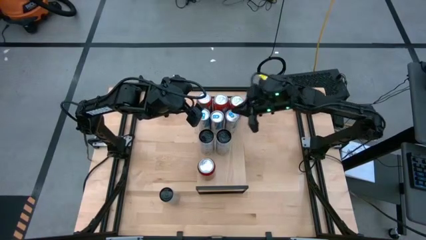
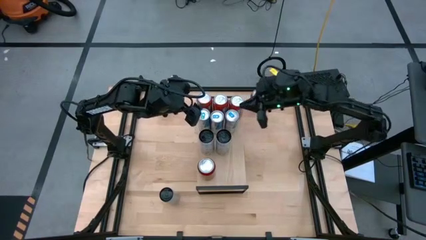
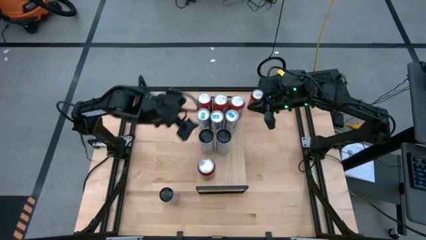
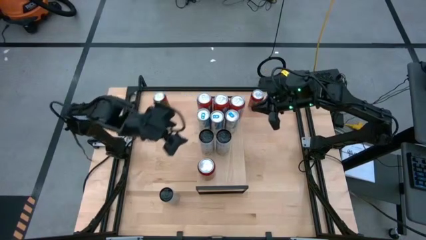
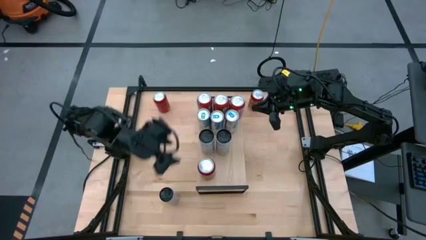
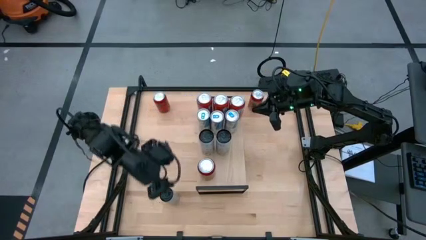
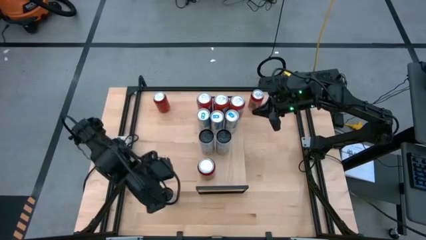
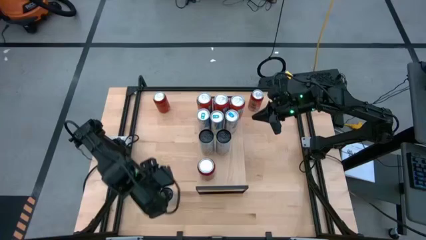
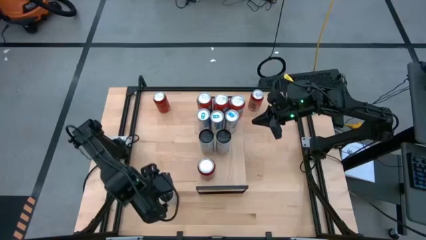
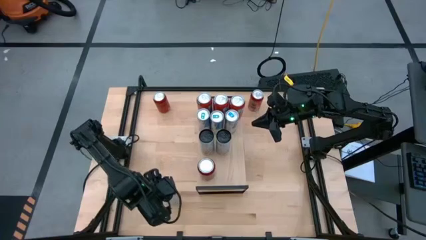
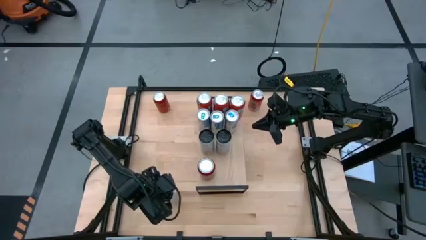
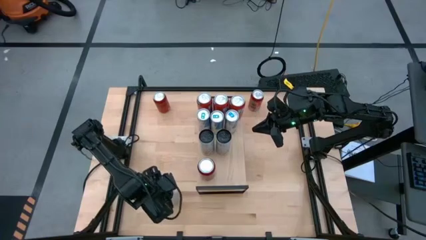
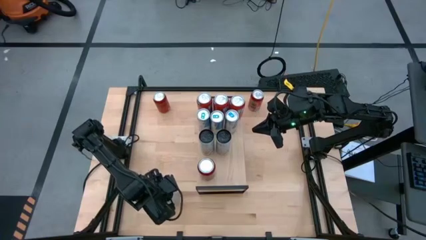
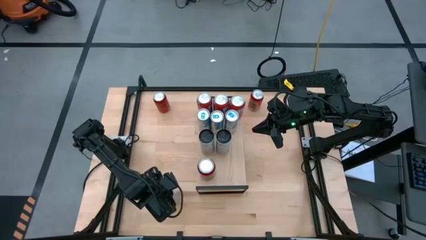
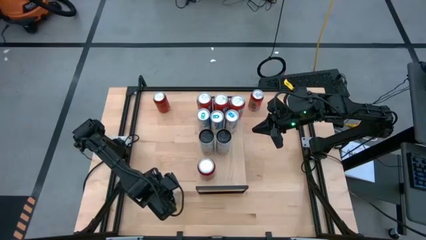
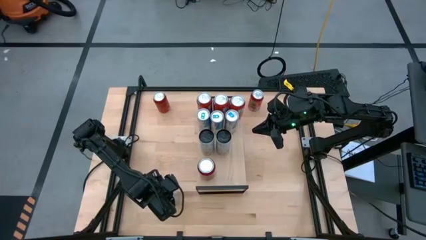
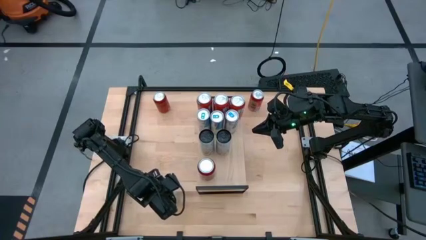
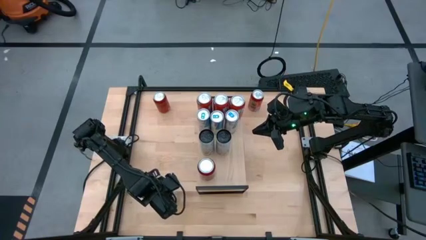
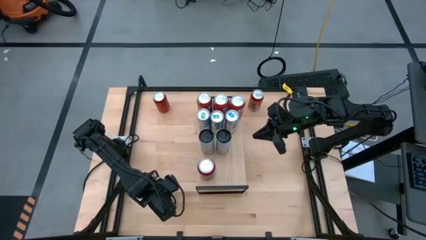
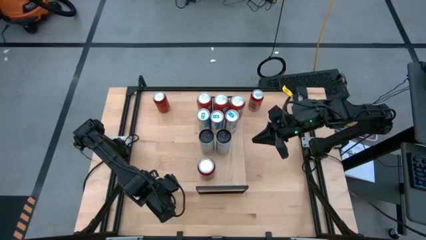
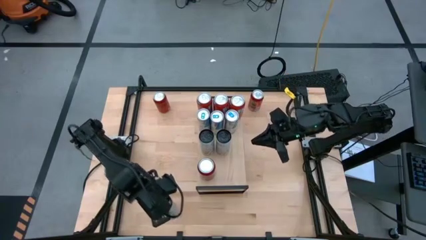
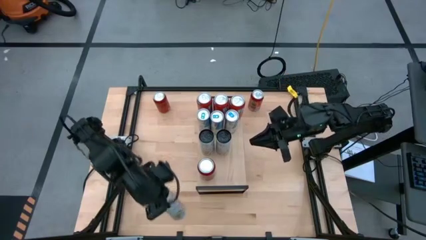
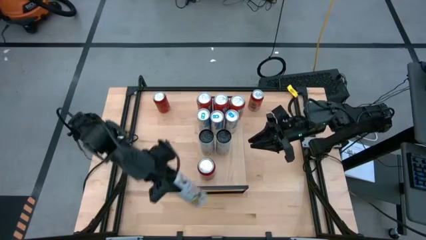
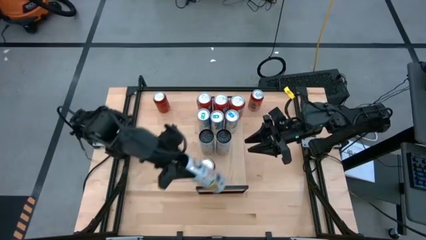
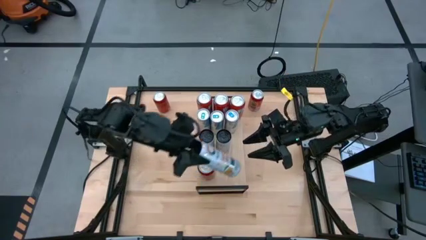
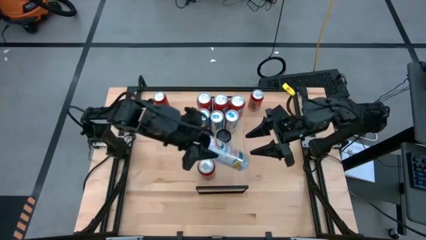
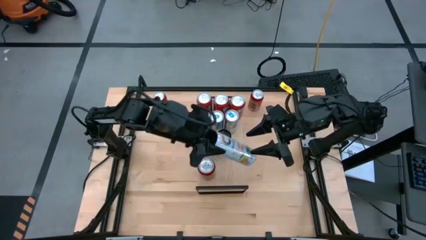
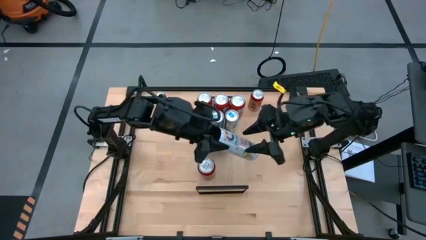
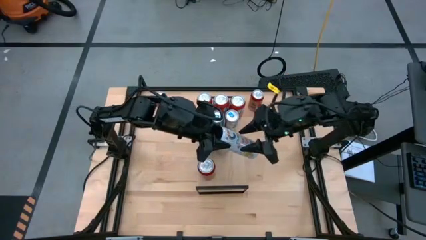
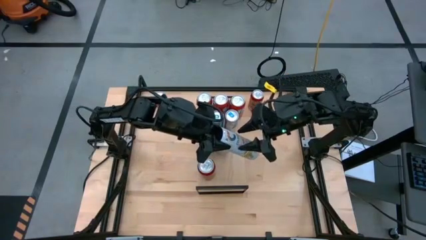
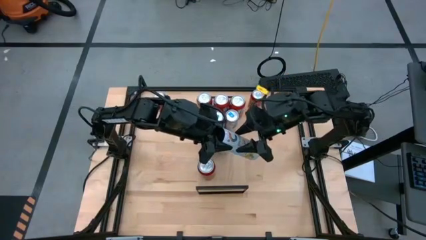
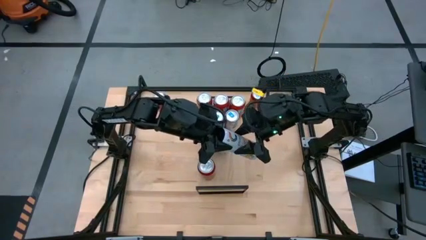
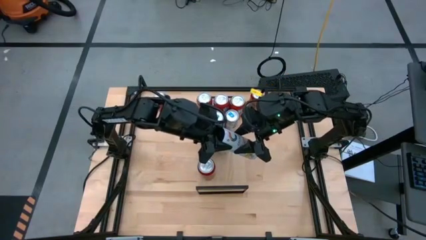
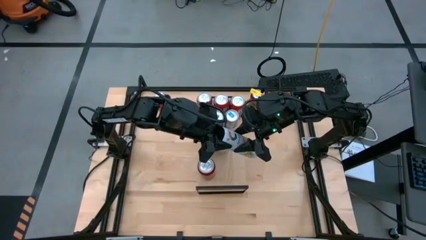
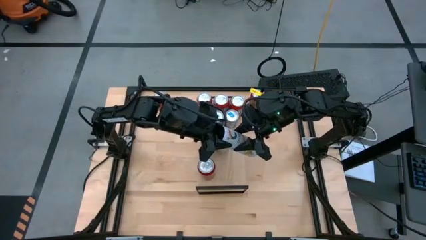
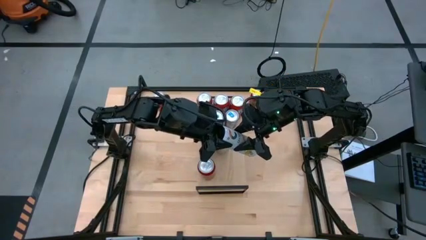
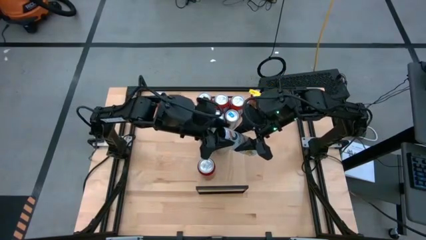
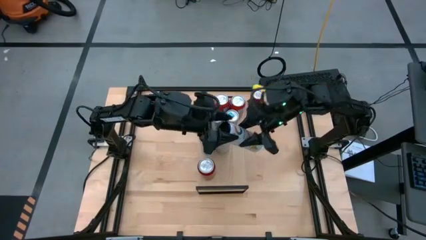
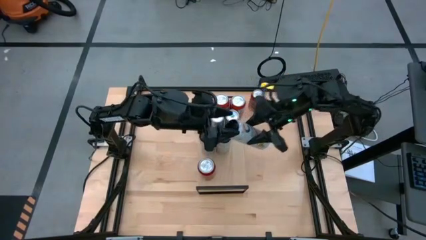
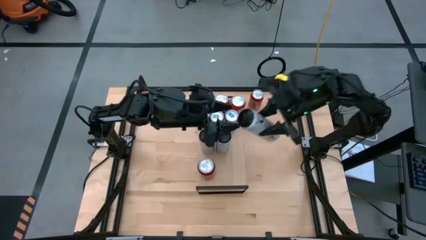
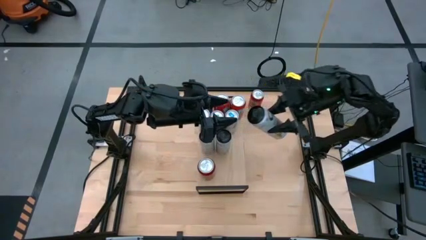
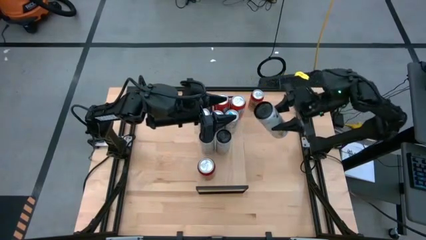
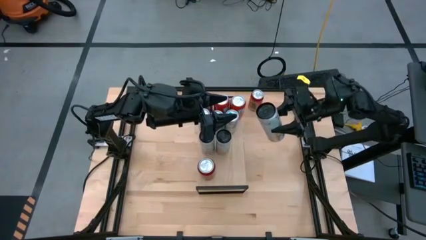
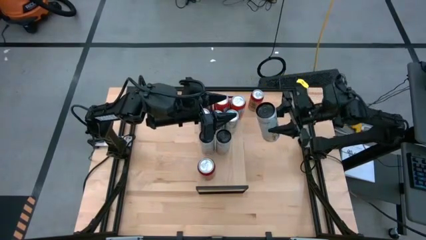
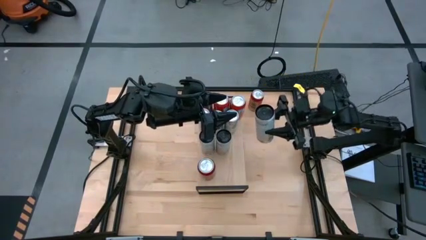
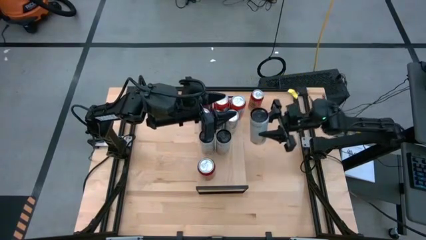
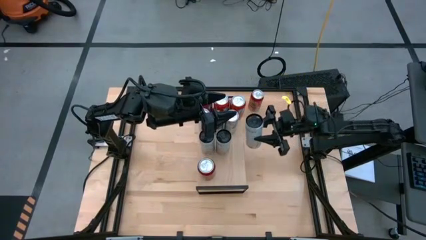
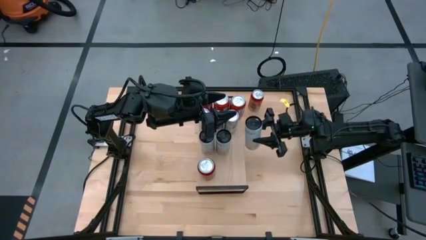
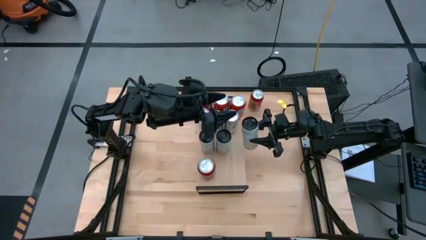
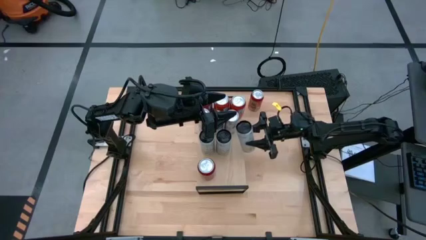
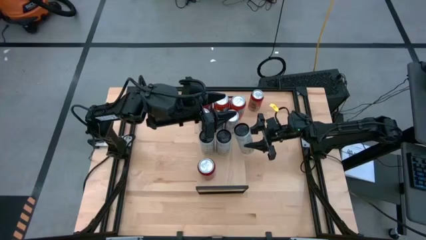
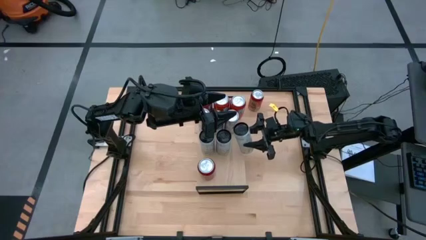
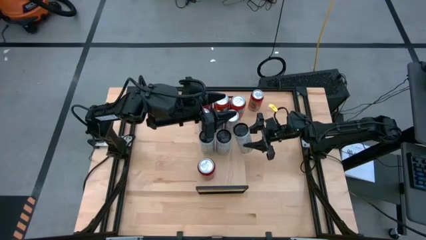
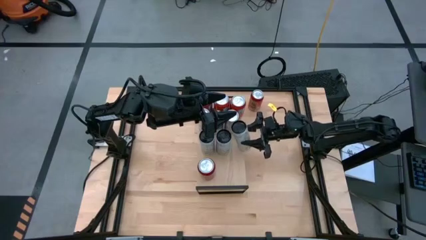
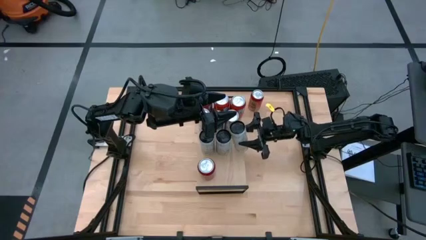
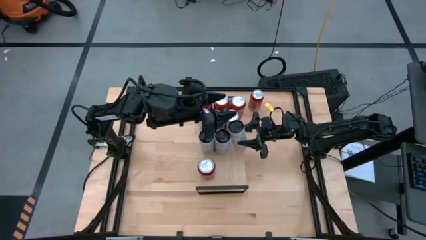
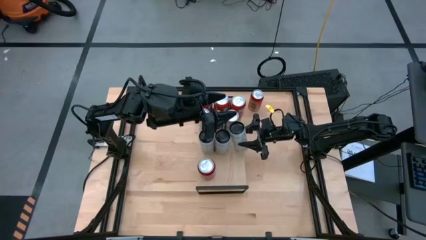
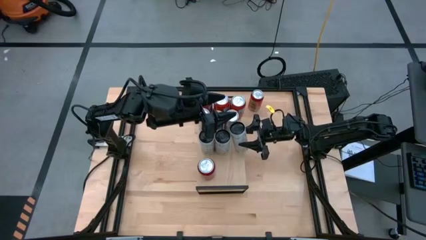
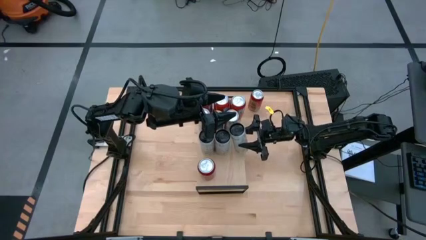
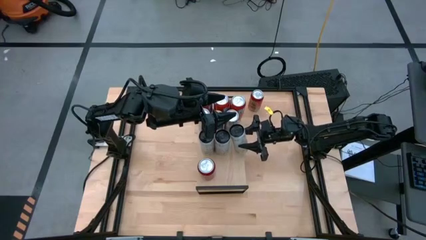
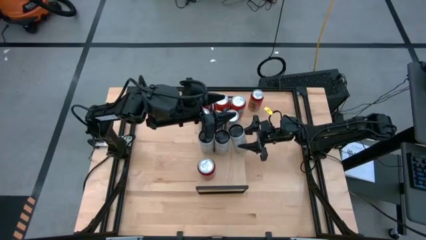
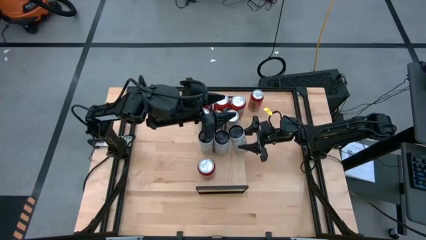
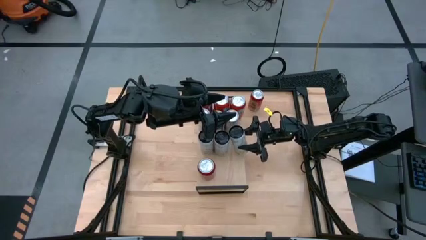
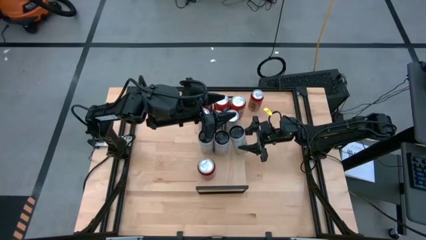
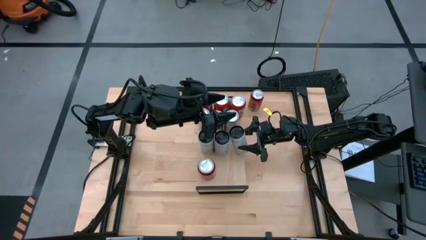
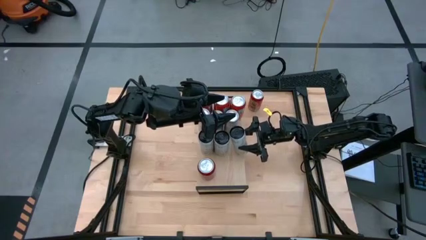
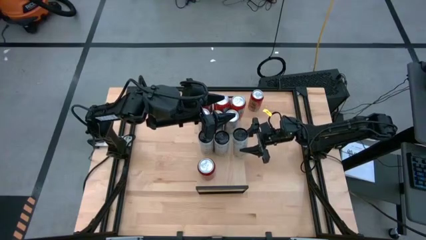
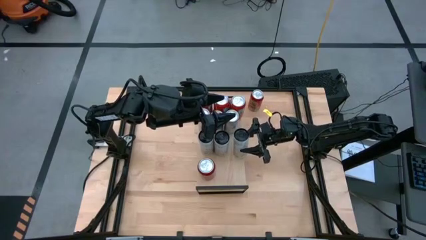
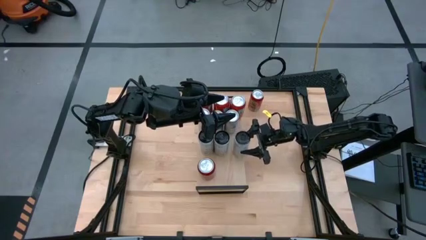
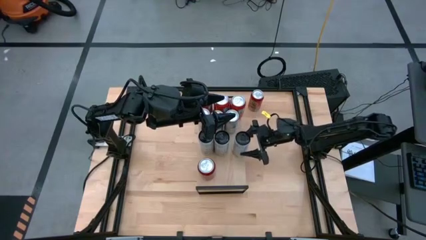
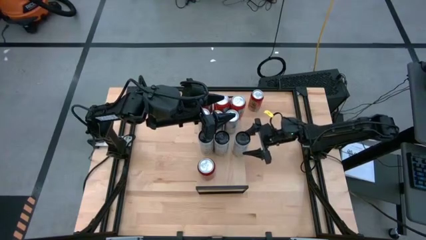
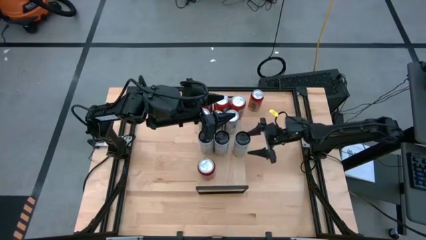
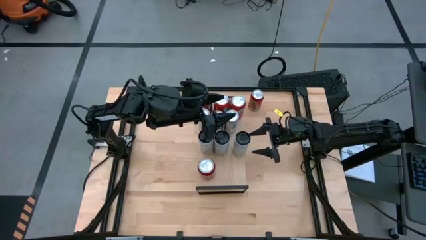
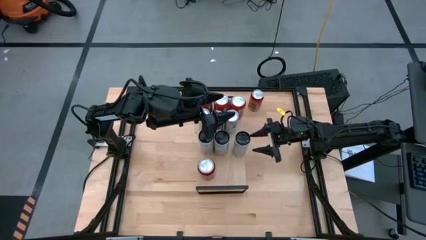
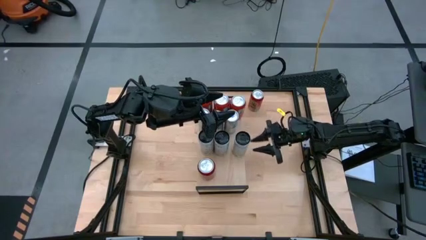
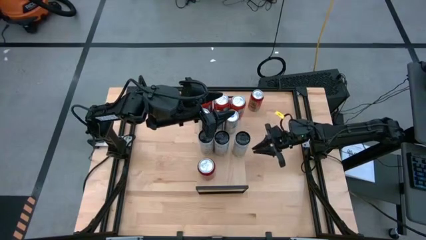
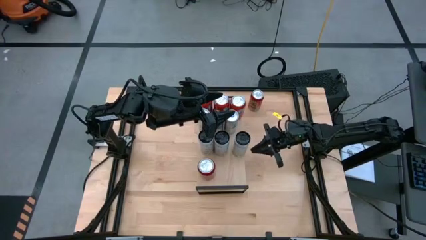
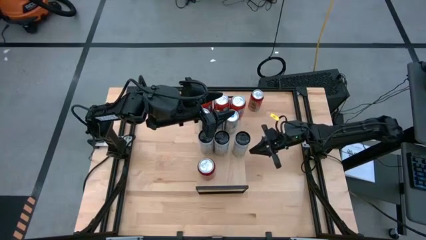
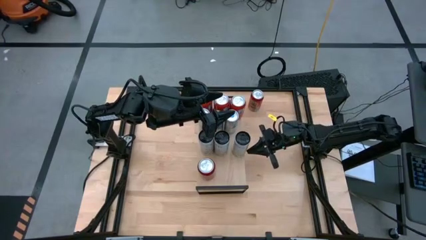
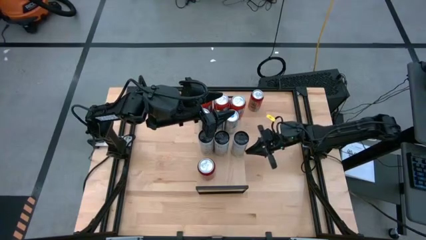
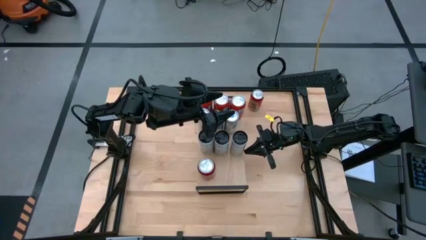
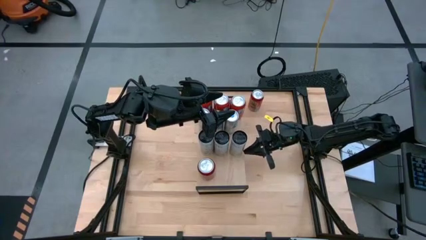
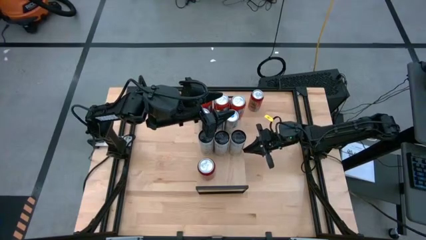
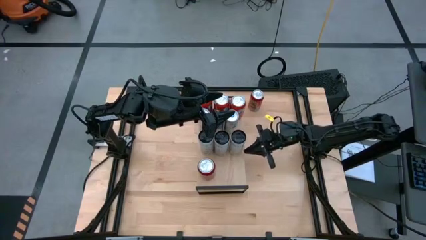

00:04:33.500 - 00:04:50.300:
Task: Place canned beverage on shelf
Put the white and yellow soda can on the shelf aligned with other white and yellow soda can
